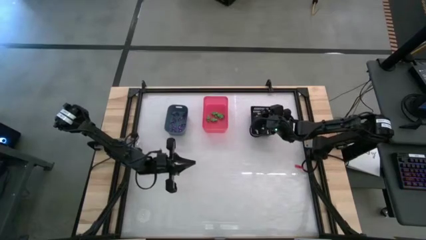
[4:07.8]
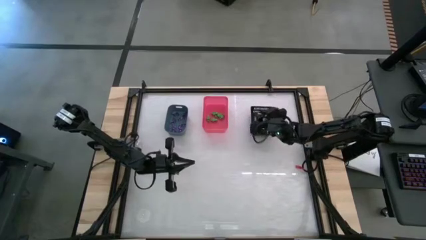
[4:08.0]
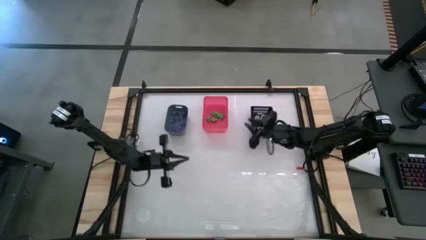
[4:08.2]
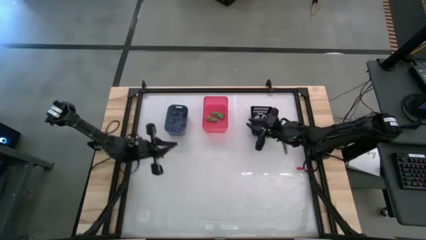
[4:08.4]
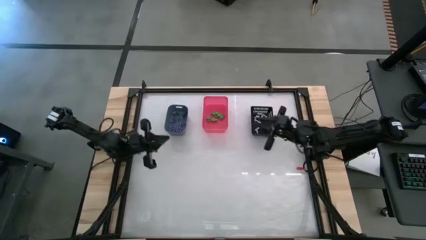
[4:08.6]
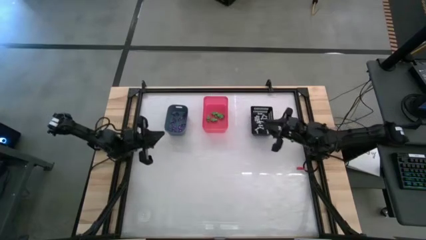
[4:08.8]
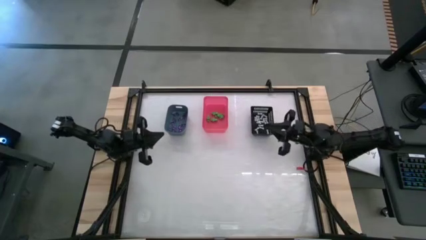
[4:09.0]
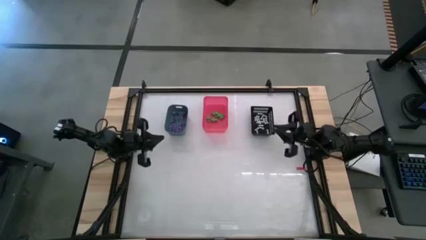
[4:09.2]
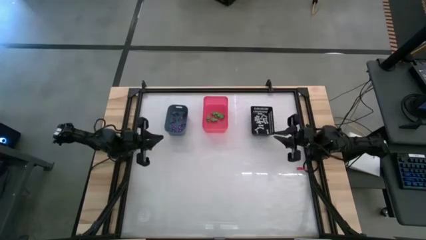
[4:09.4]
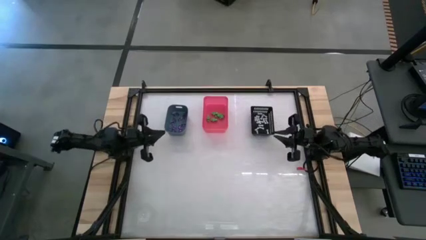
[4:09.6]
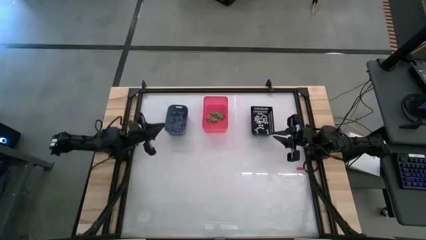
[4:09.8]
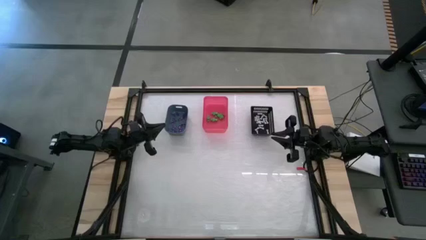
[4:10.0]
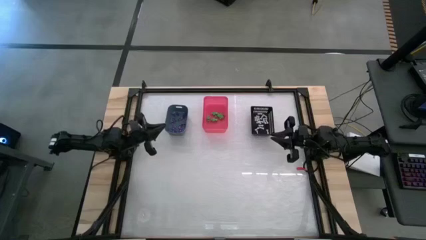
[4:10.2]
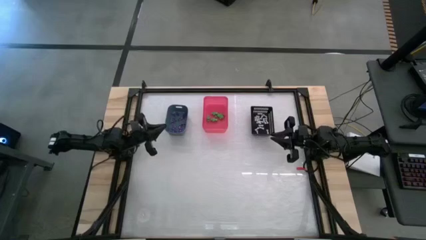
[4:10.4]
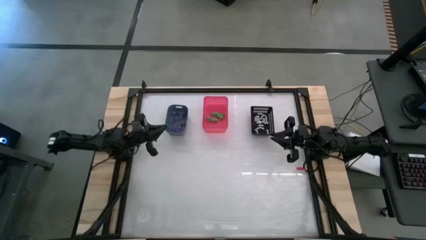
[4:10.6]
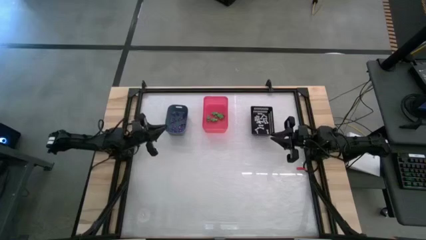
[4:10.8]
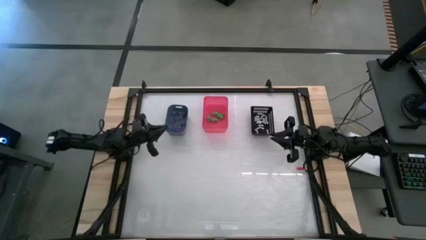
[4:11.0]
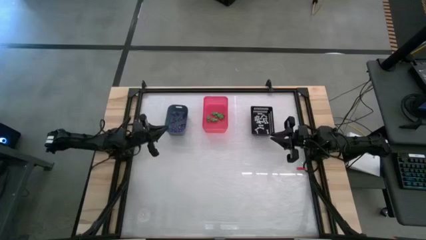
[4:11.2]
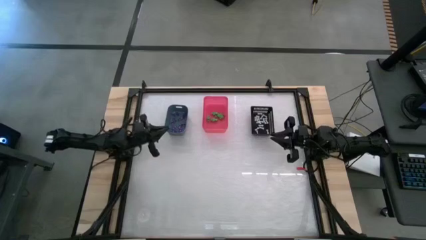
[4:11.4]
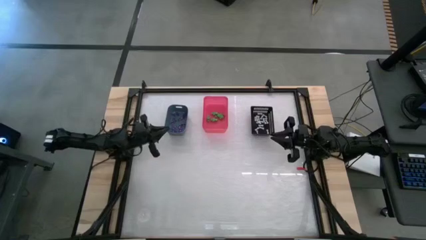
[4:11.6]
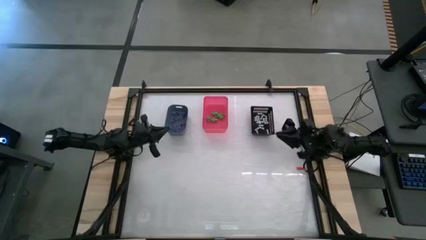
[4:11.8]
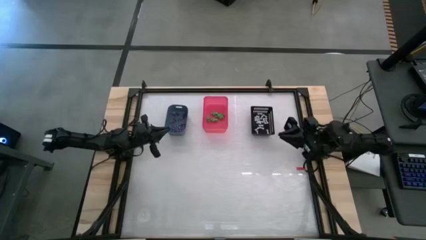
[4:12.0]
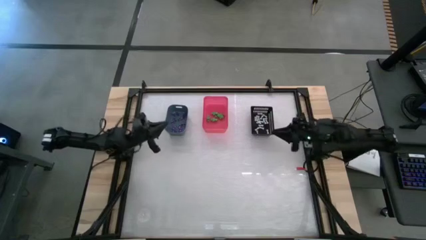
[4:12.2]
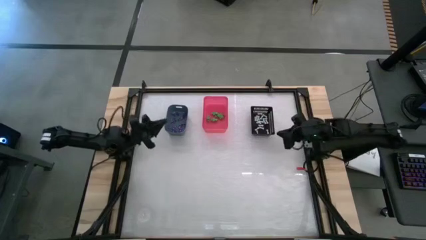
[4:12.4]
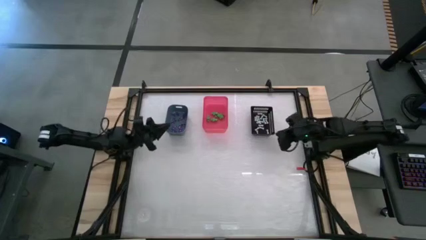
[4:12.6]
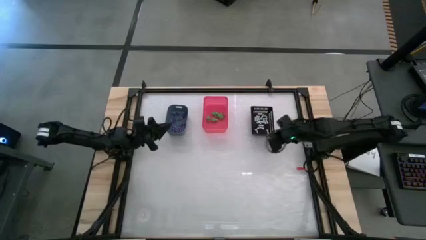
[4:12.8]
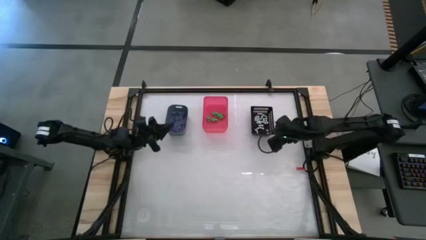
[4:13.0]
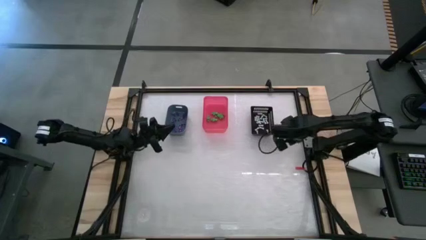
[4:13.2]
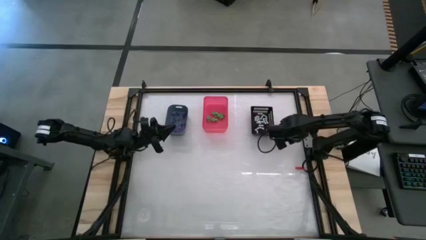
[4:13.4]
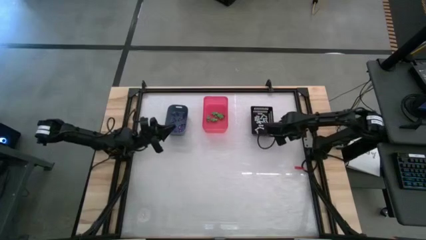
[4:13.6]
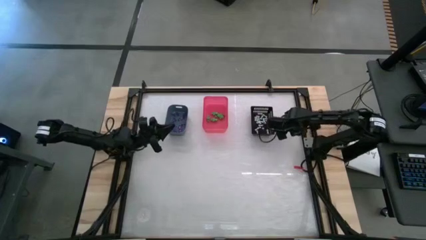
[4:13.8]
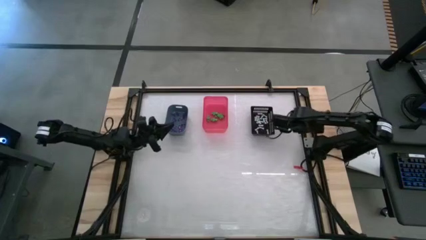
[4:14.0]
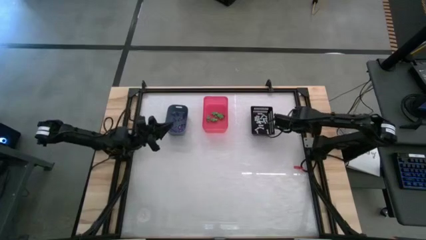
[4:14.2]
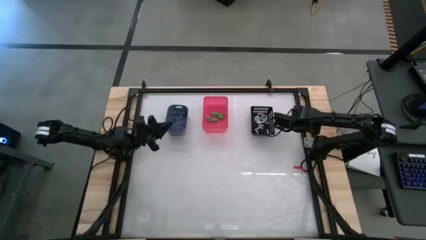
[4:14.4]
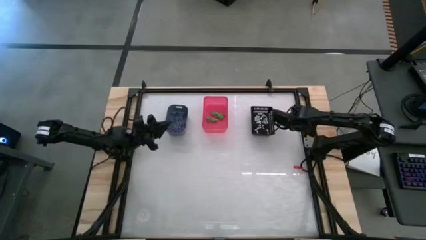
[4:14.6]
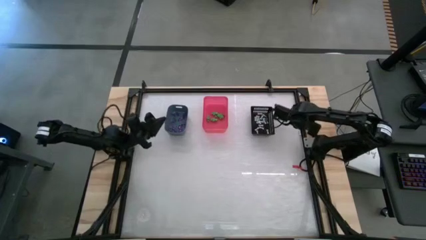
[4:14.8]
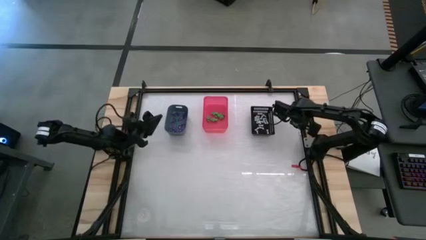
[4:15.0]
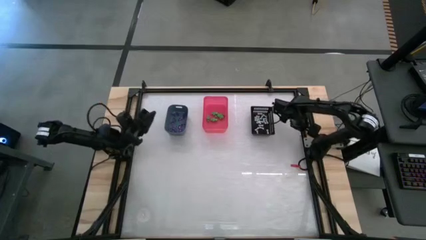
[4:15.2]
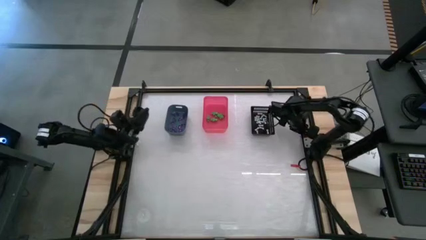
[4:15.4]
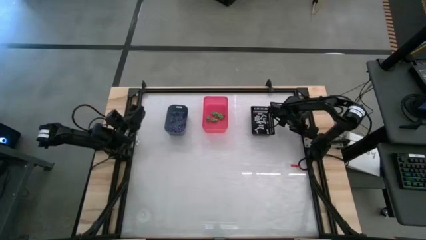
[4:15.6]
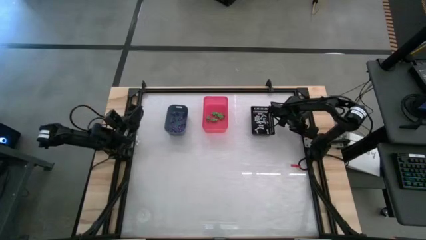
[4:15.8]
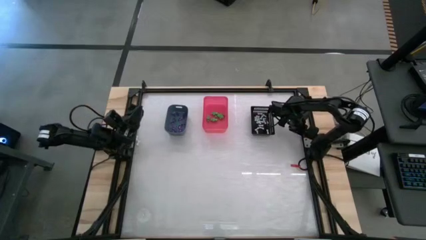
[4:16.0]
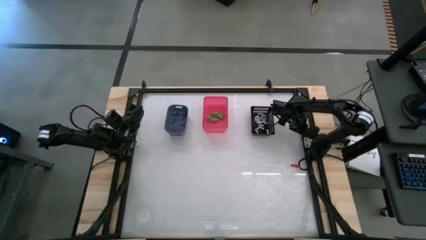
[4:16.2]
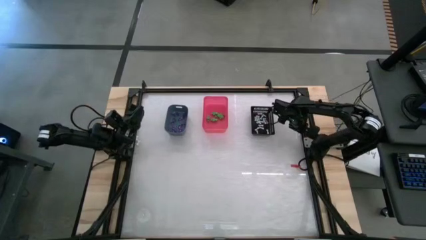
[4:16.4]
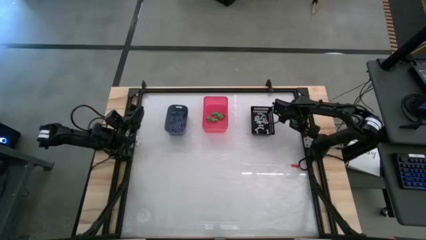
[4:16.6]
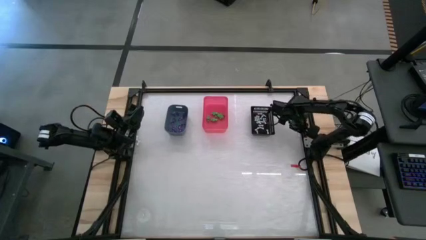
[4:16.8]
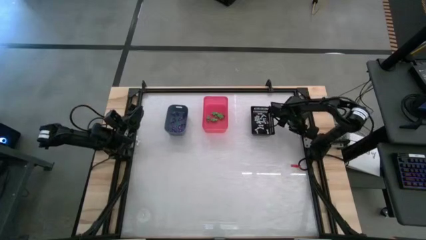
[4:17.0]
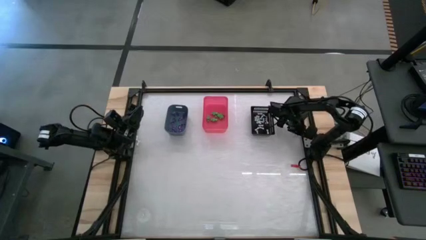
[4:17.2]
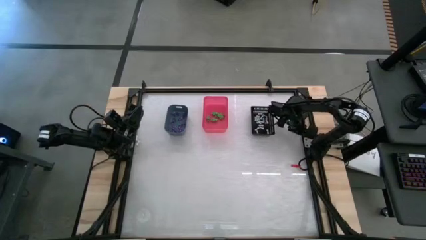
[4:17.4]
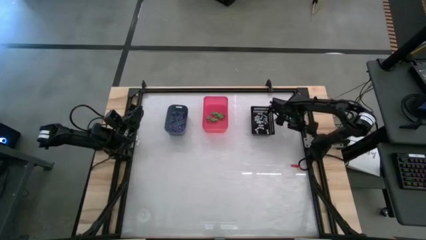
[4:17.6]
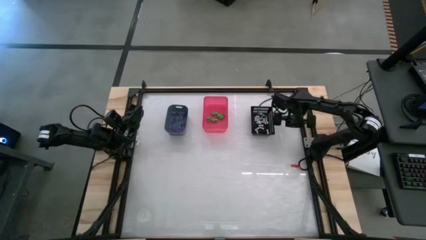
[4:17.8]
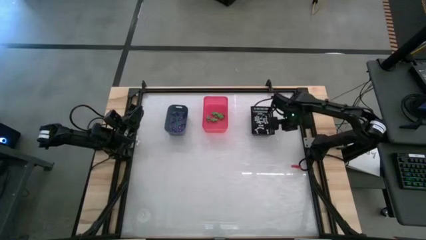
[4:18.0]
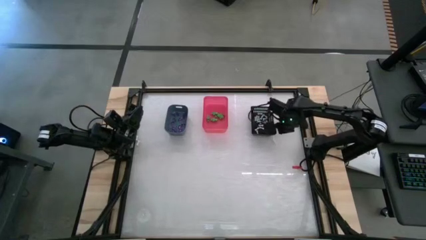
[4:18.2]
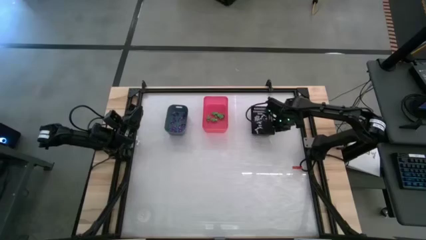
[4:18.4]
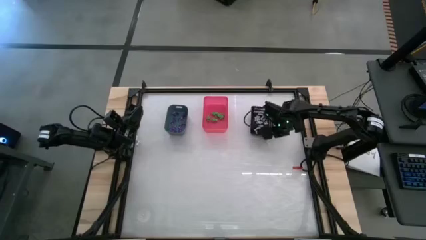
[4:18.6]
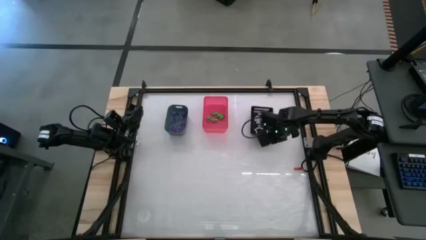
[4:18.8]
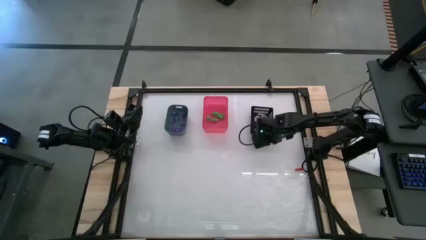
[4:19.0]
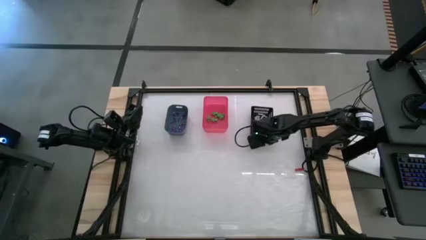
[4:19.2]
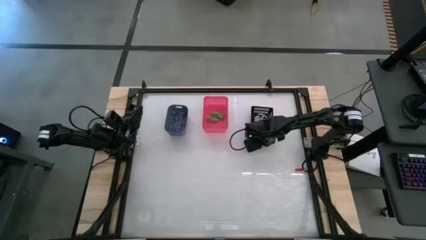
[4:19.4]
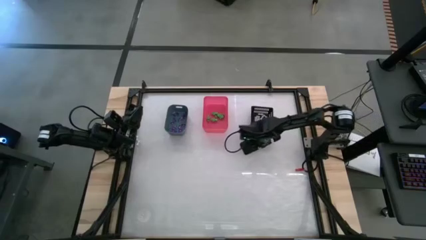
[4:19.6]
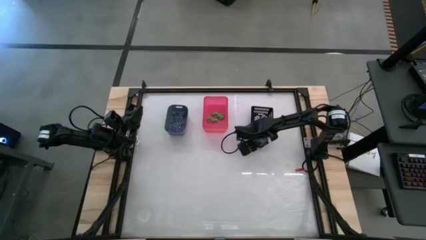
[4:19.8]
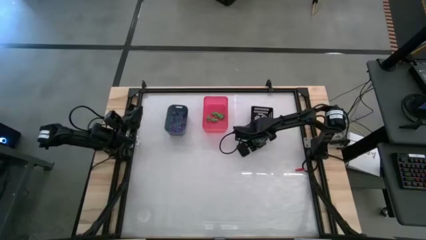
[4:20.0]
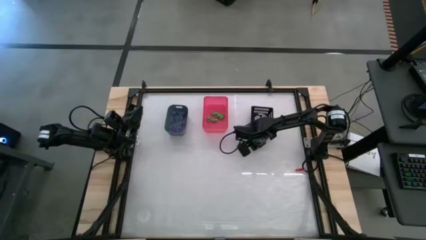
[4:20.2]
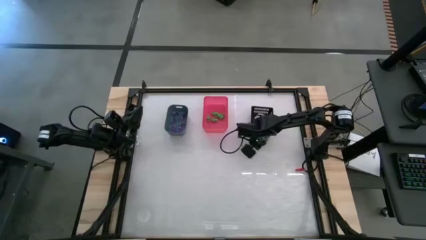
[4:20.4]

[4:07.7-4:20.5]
Task: Sort Halloween decoration
Put the white bone toy into the black bin

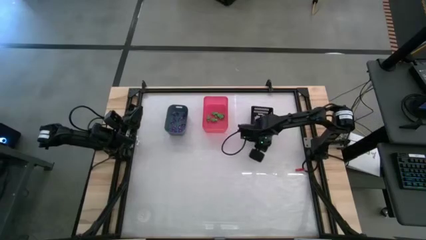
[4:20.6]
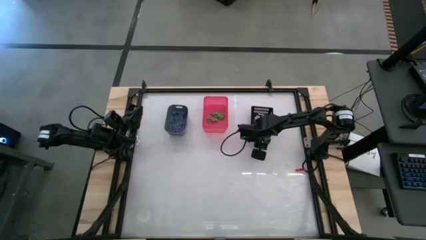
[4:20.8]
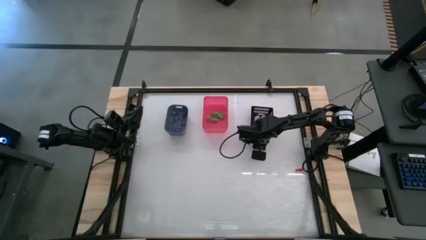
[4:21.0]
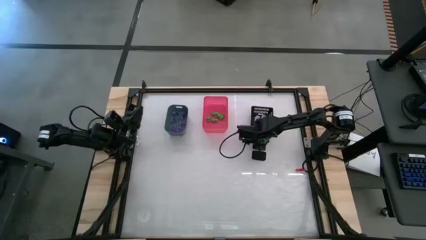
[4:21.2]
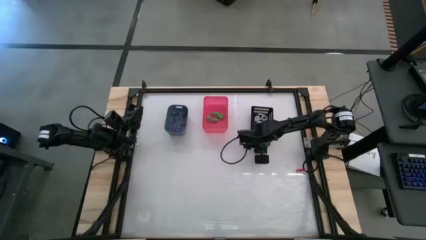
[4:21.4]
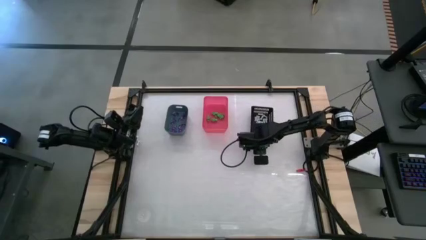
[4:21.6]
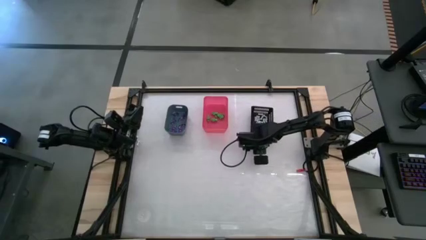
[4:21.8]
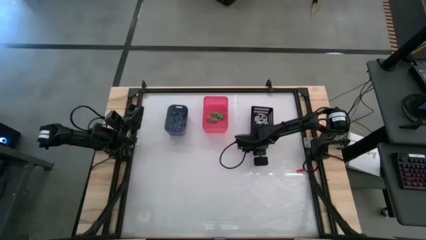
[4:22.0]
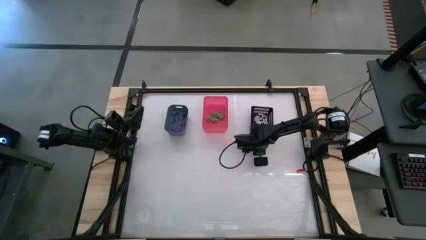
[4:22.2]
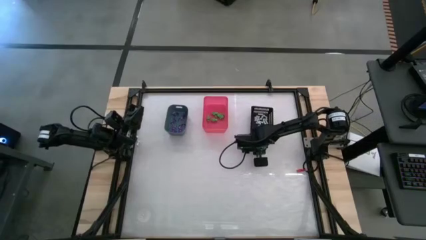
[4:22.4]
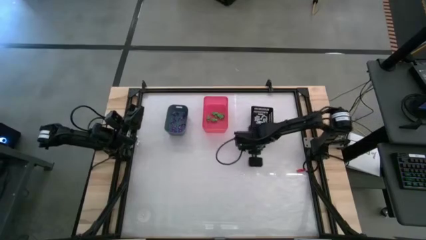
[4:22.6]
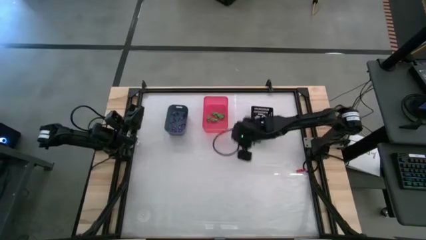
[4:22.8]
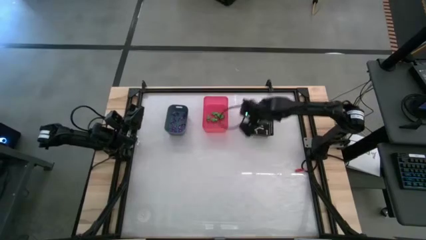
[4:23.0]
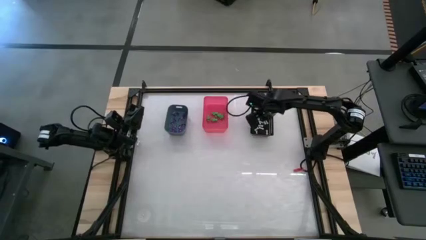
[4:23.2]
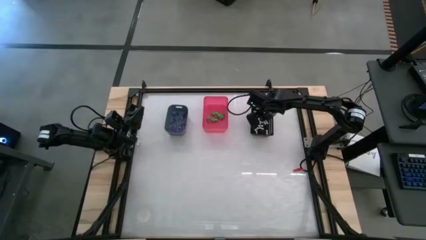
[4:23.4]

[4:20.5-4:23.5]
Put the white bone toy into the black bin

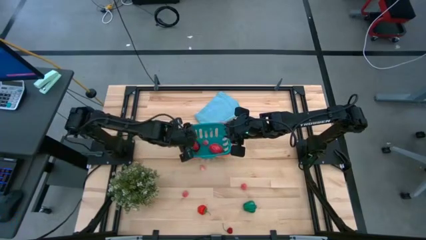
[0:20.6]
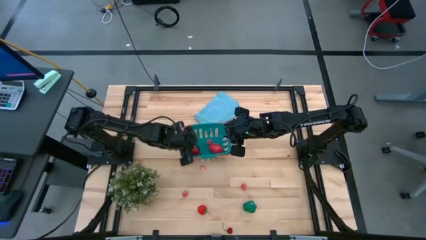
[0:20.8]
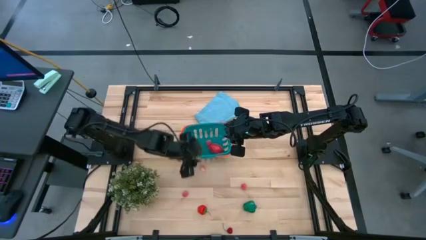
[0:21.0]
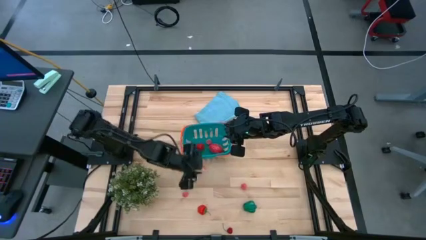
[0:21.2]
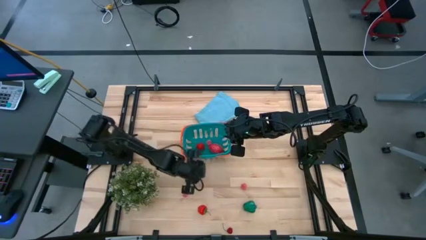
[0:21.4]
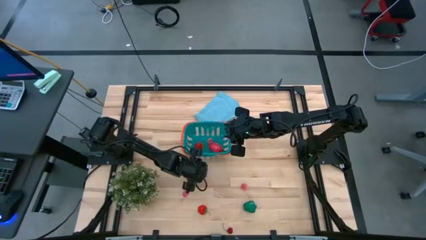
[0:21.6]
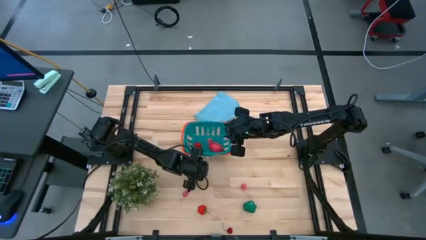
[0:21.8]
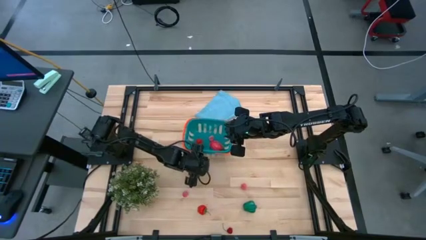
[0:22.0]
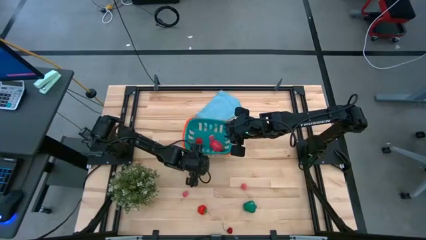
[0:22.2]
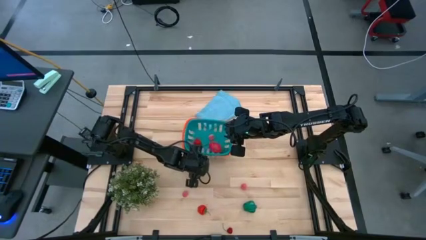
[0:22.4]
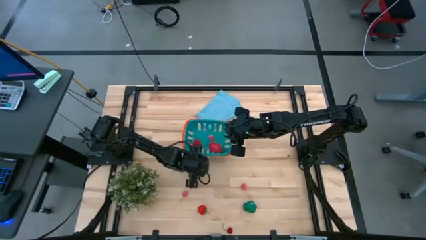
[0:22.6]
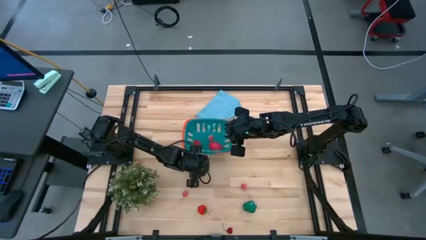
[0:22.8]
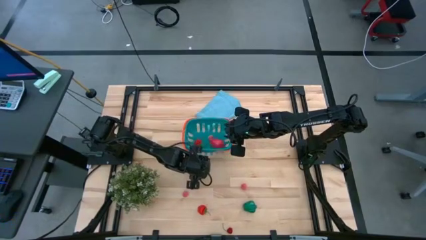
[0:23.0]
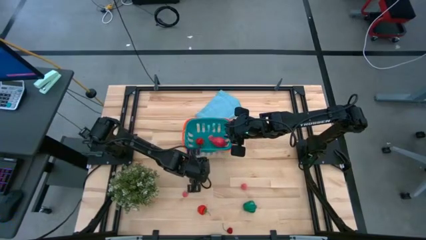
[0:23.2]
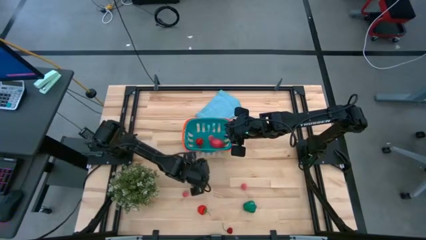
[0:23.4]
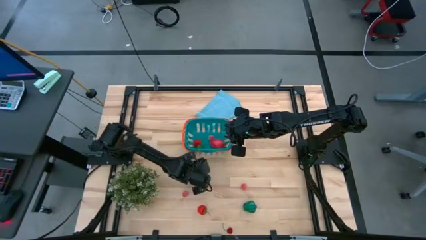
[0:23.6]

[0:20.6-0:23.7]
Task: Pick and placing Produce into tupperware
Put the pink peach into the bin
